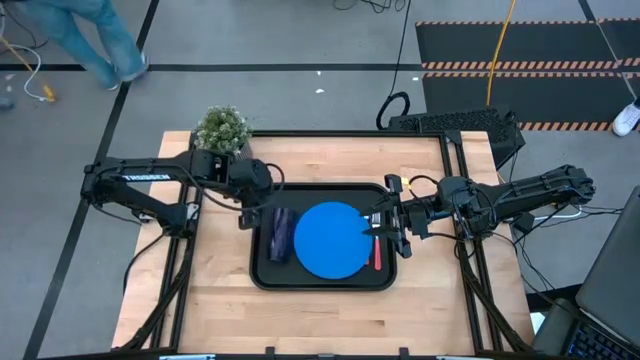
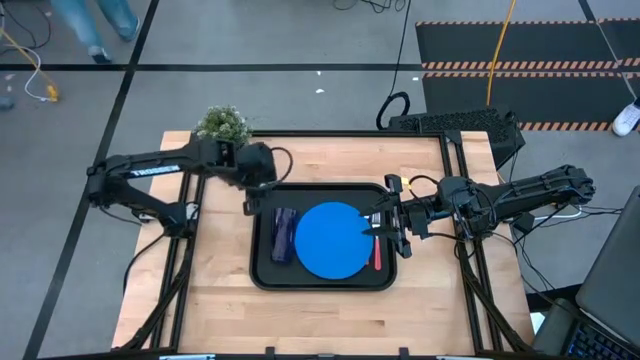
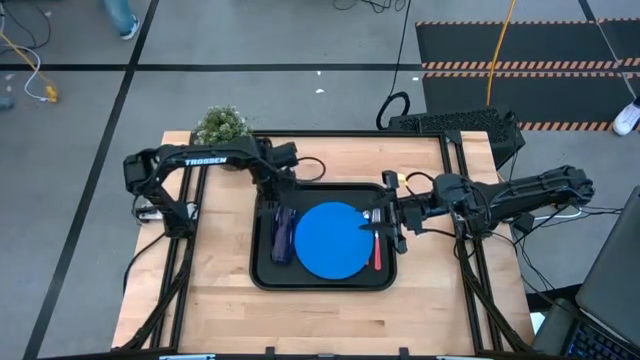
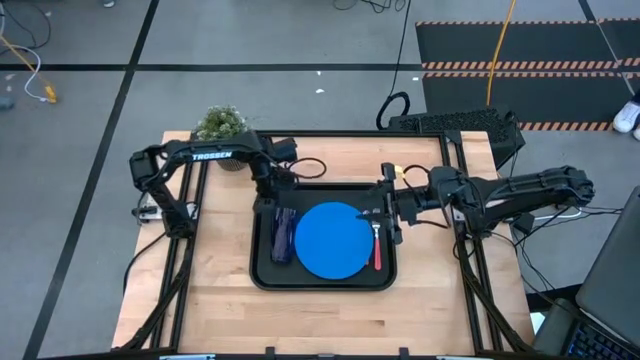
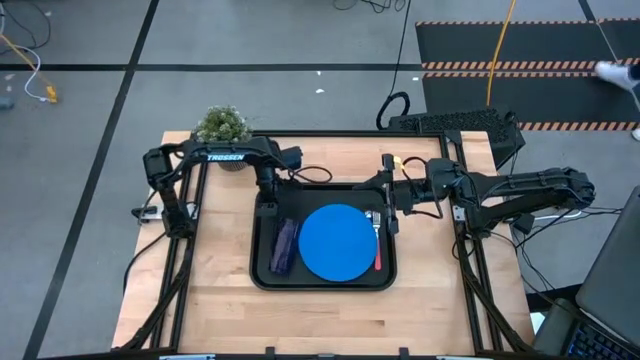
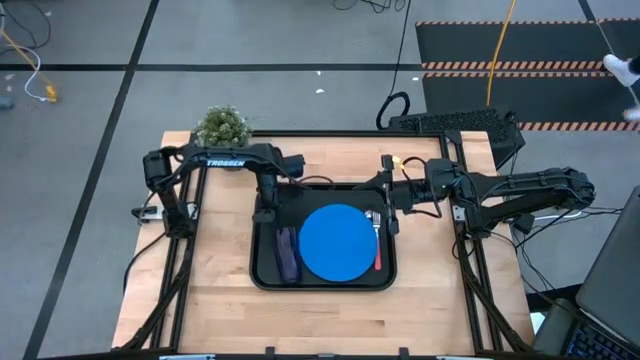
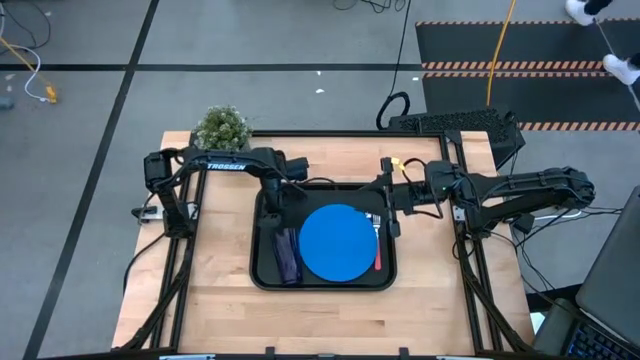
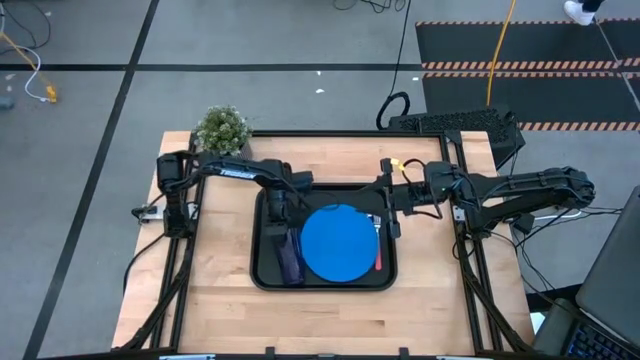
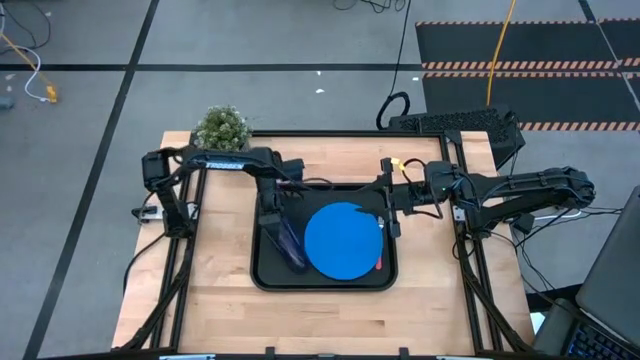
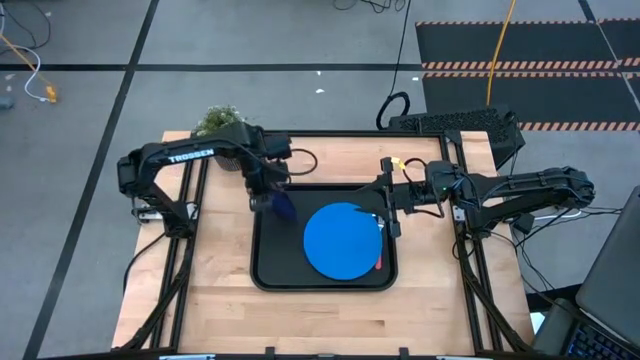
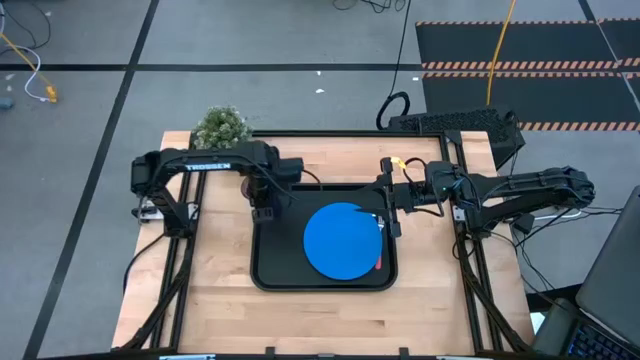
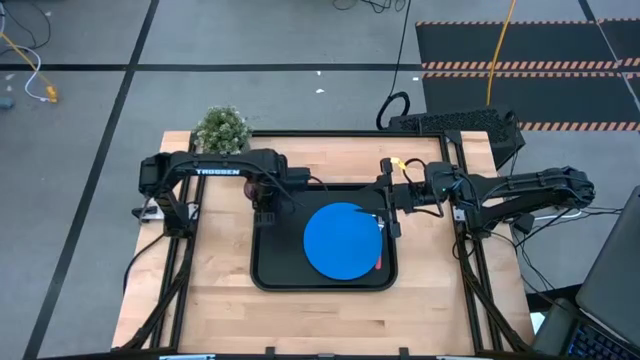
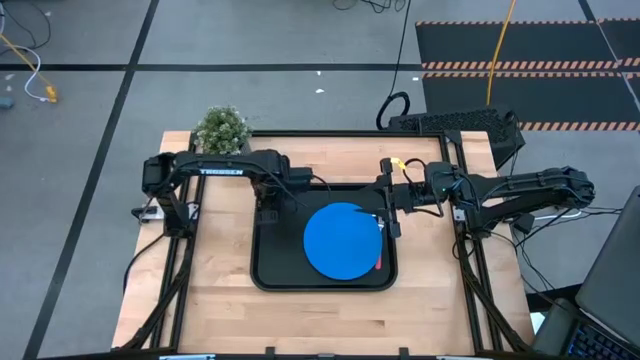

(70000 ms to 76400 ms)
Task: Pick and place plate/cup/fork/spoon on tray
Put the violet cup on the black tray to the upper left of the blue plate

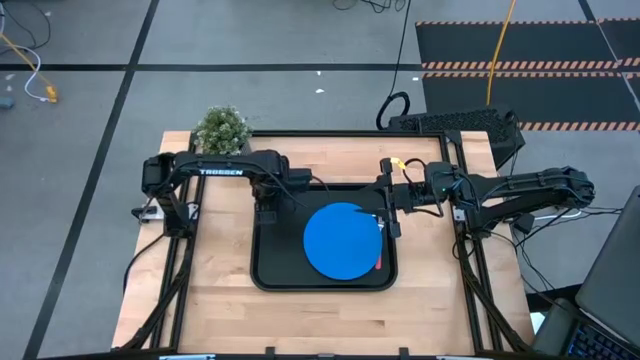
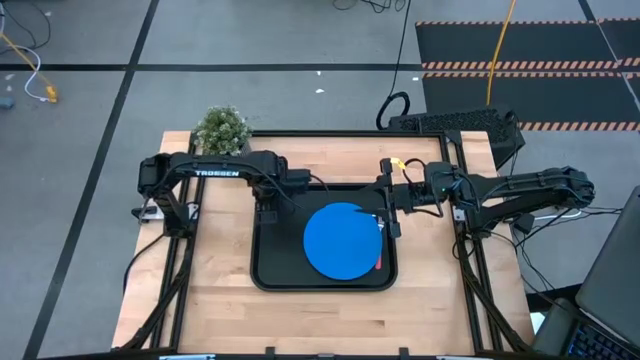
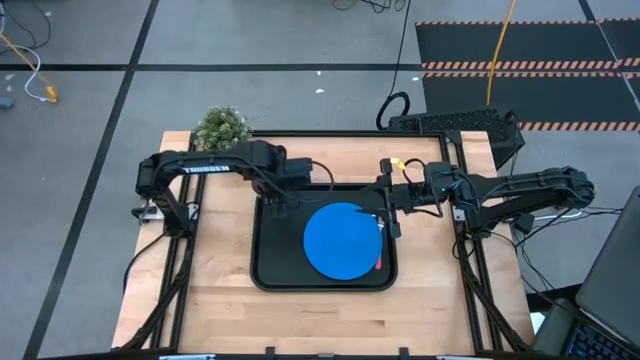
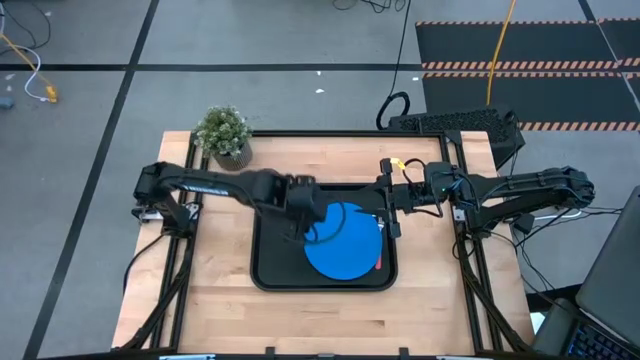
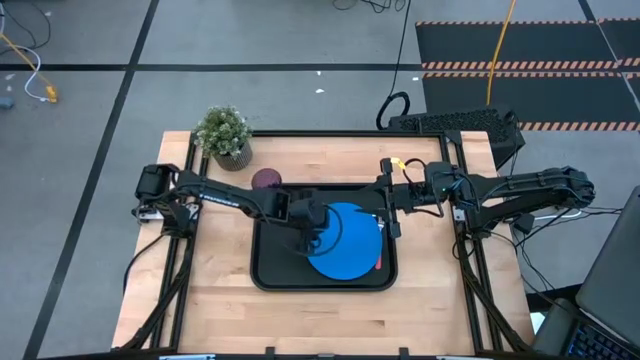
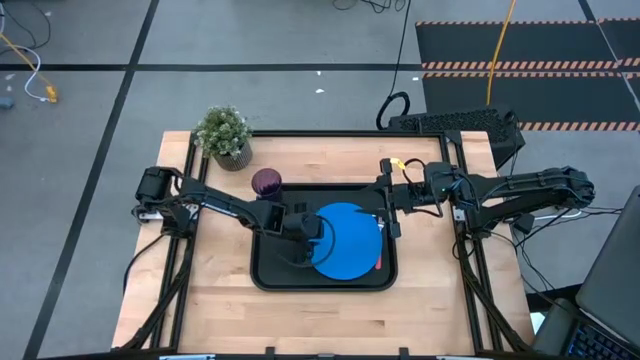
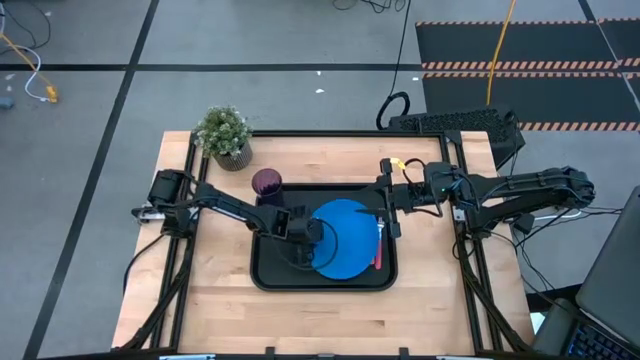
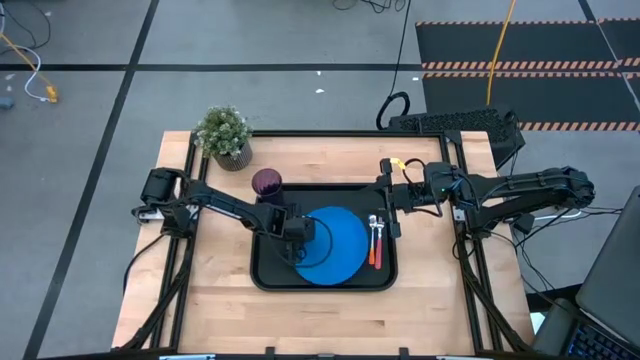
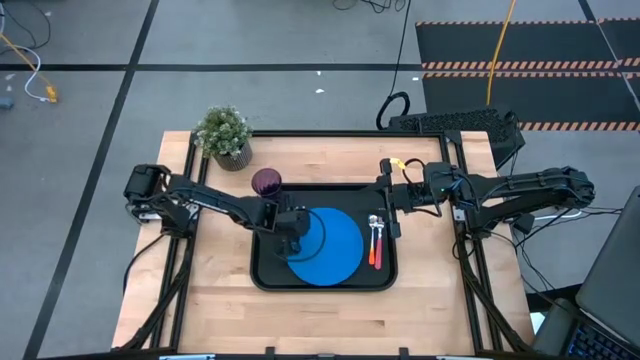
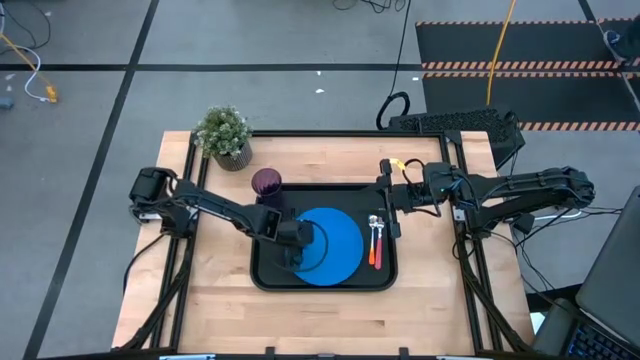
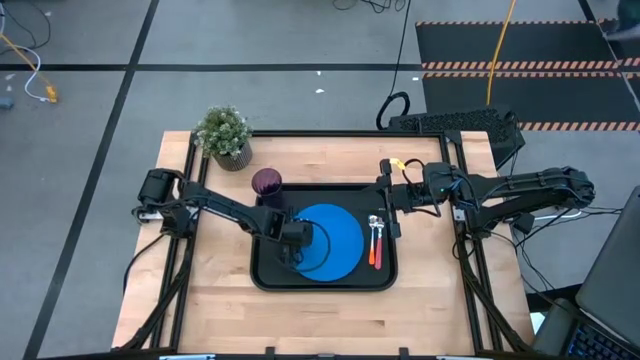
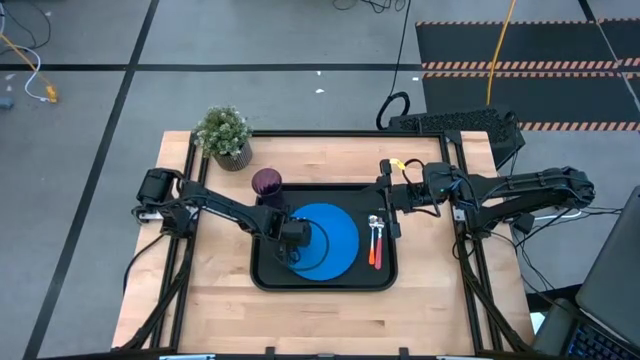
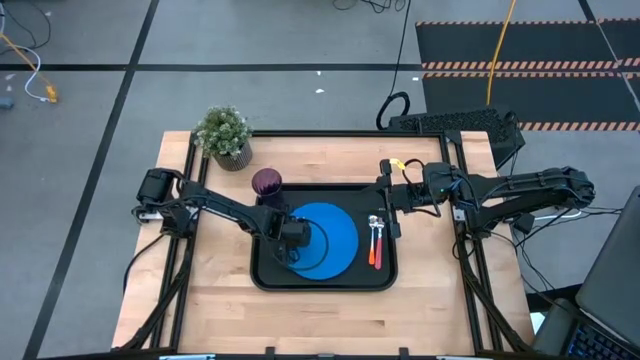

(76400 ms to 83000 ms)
Adjust the blue plate on the black tray

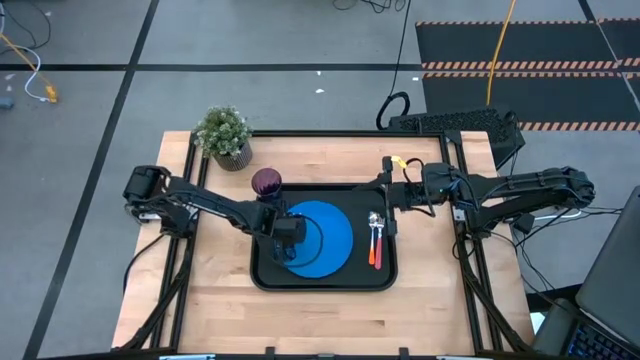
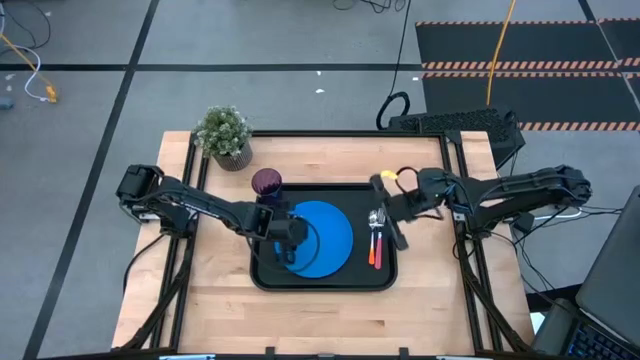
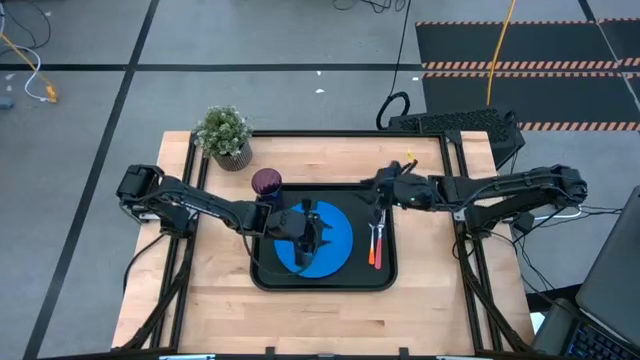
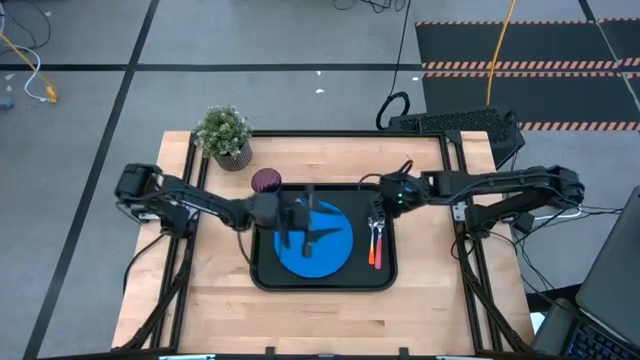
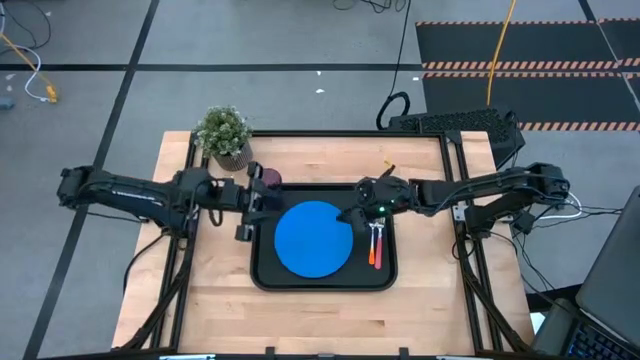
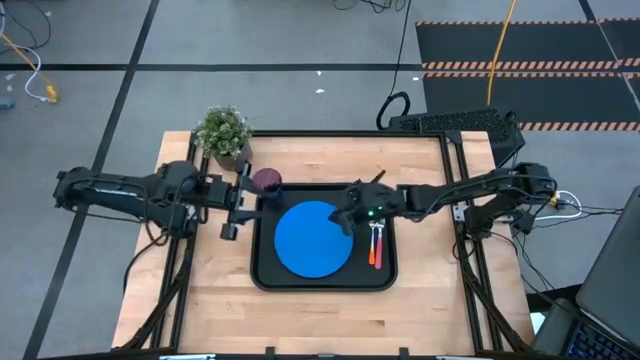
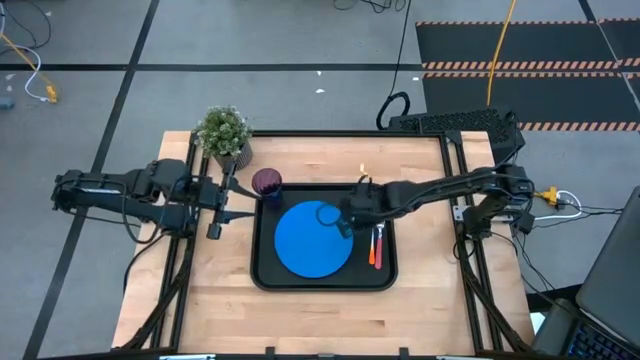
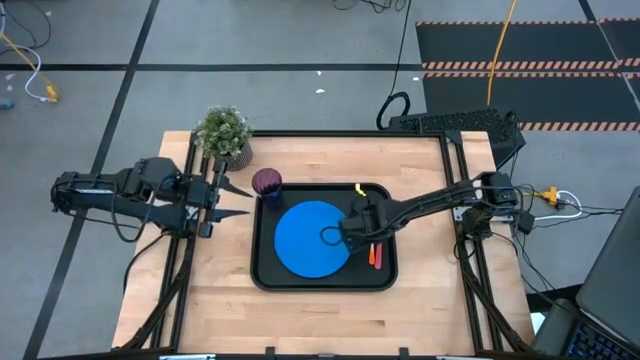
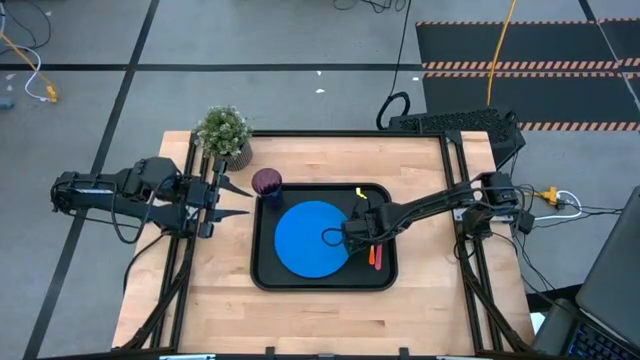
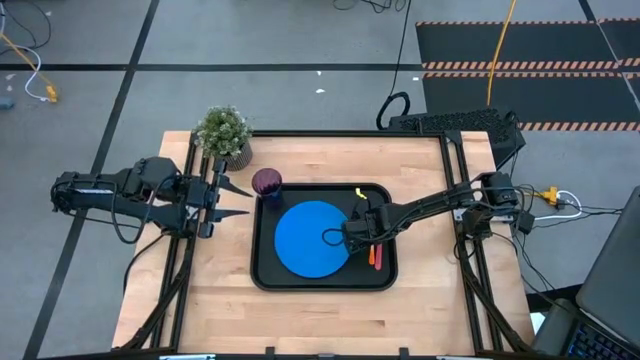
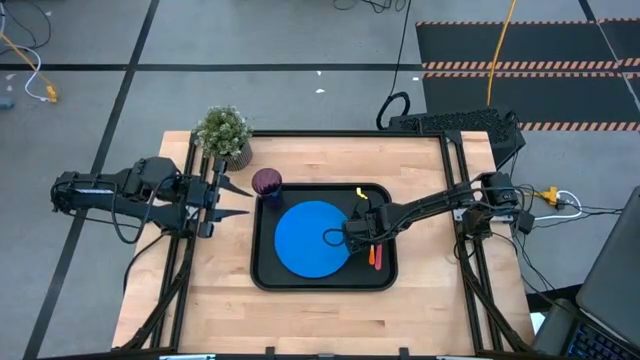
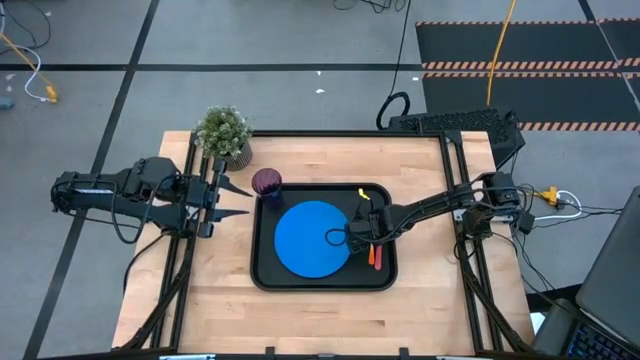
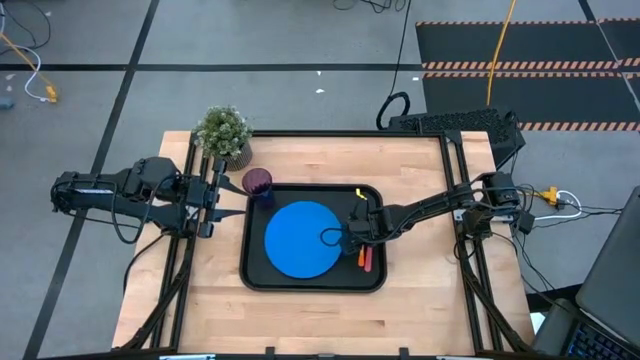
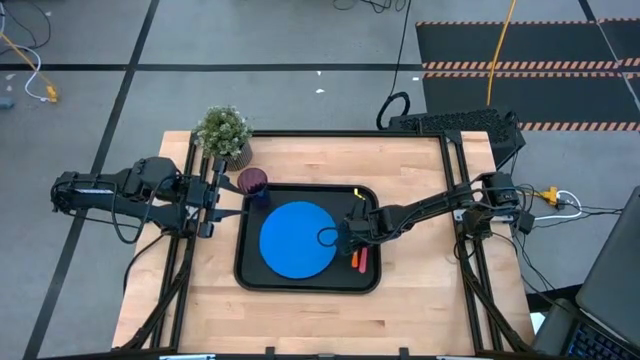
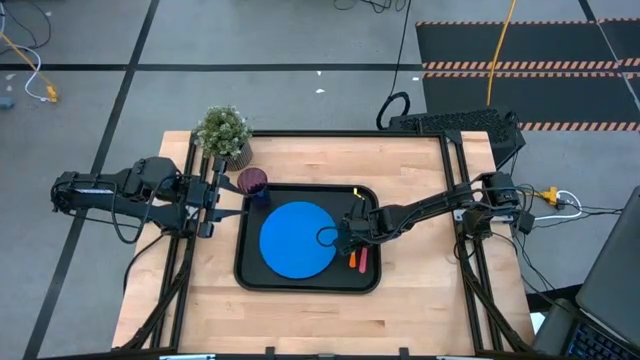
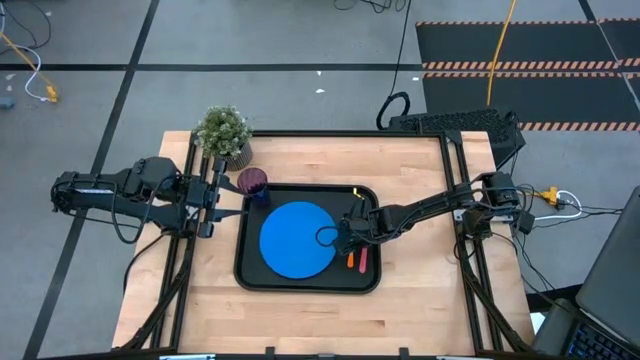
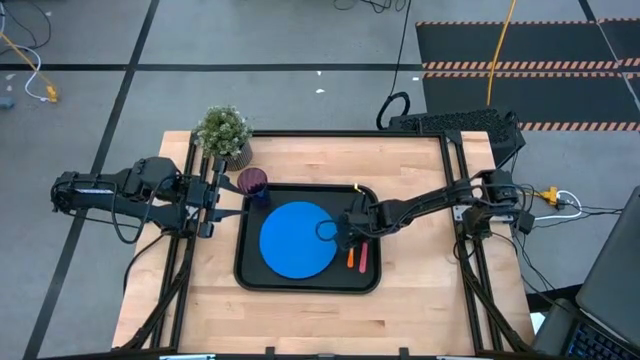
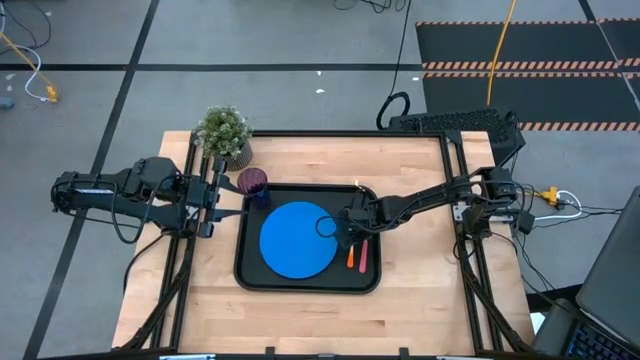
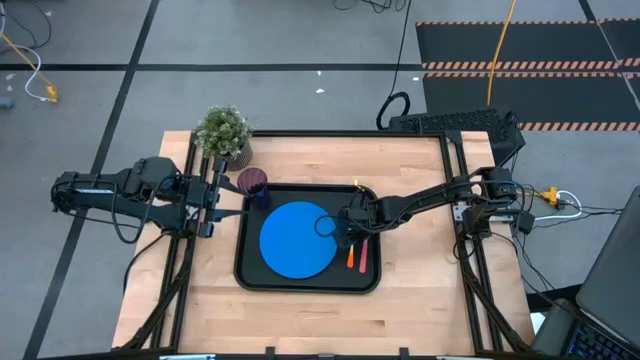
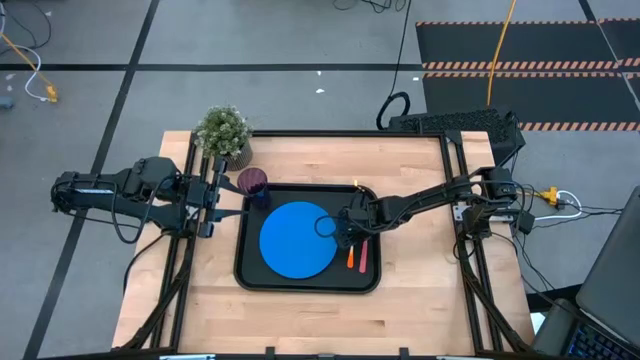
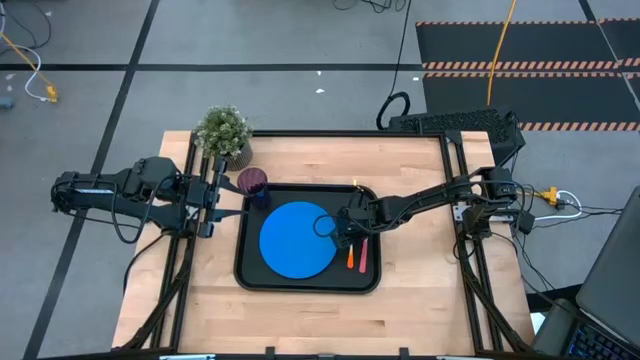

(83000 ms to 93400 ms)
Adjust the orange spoon on the black tray
